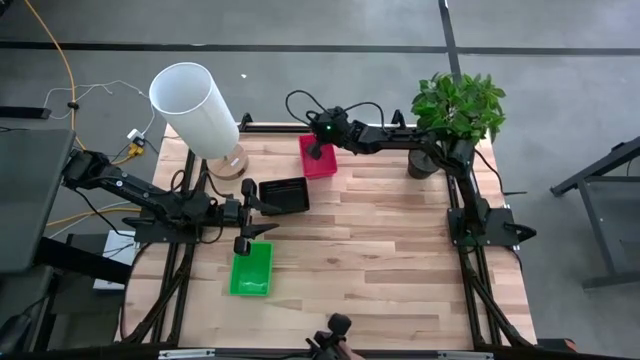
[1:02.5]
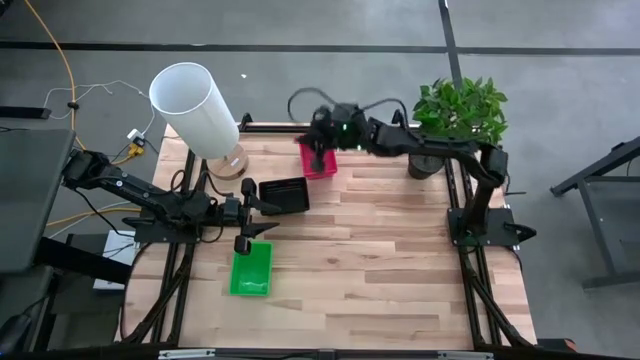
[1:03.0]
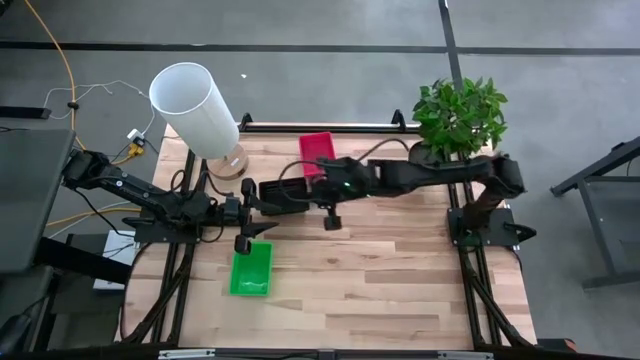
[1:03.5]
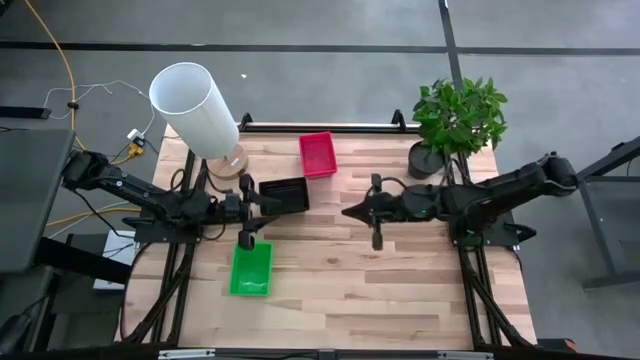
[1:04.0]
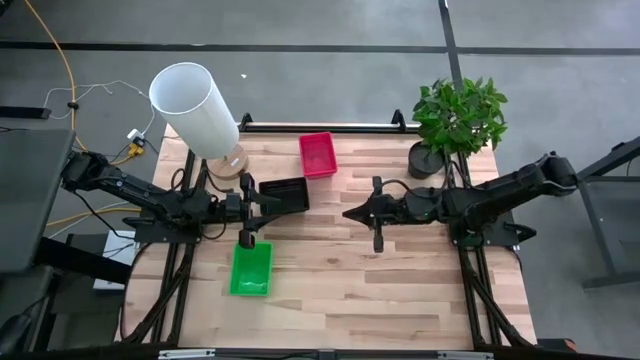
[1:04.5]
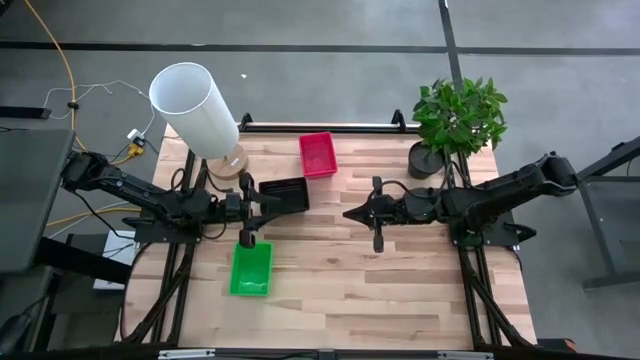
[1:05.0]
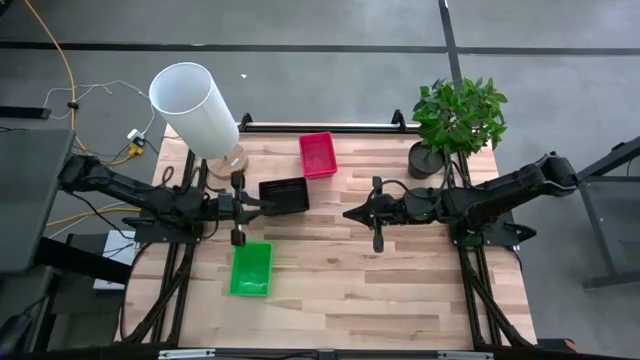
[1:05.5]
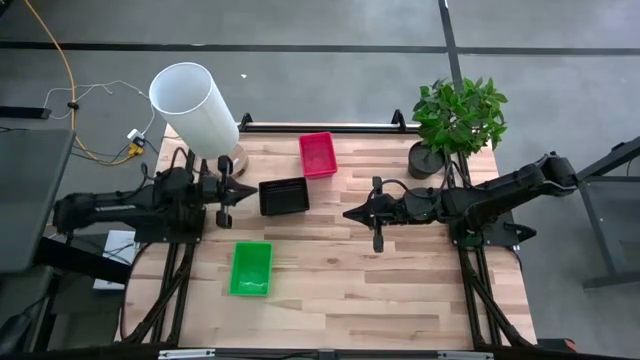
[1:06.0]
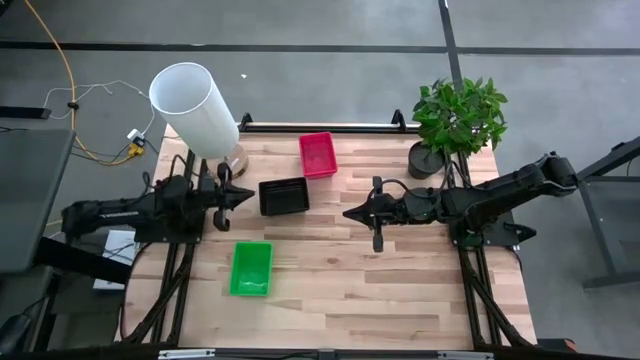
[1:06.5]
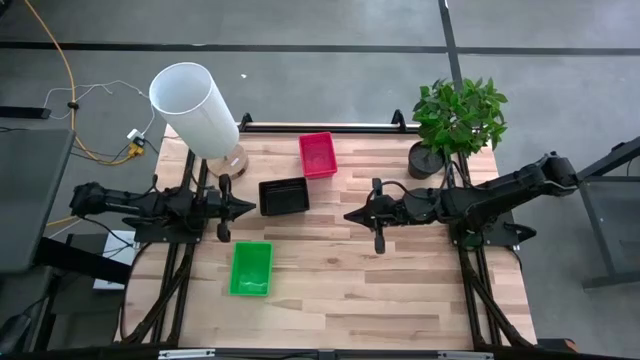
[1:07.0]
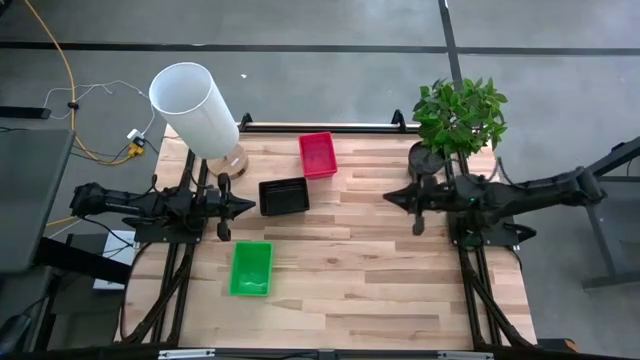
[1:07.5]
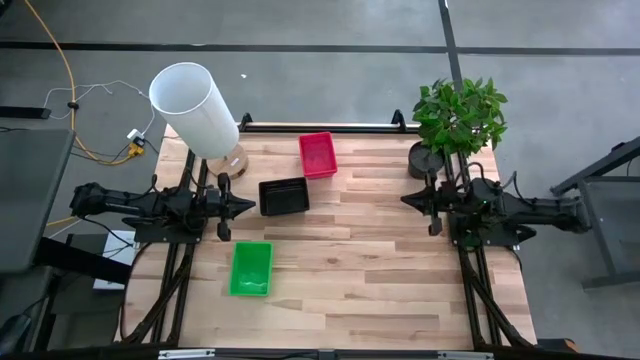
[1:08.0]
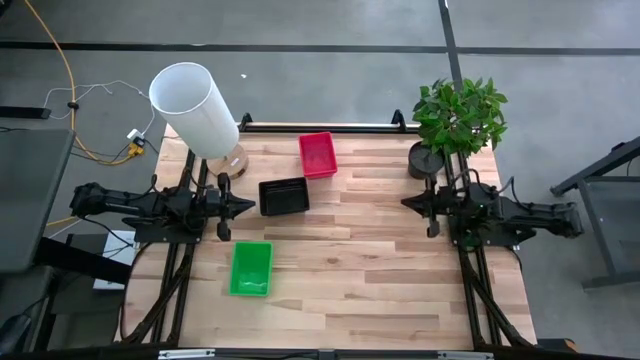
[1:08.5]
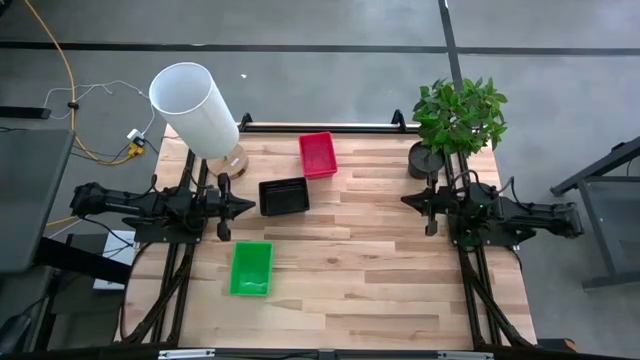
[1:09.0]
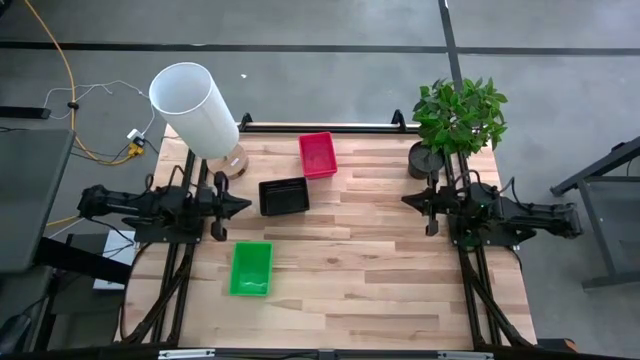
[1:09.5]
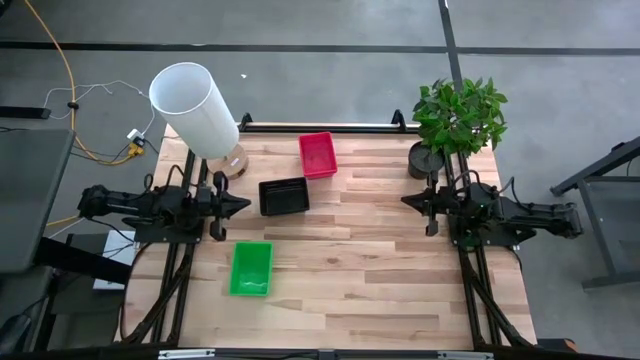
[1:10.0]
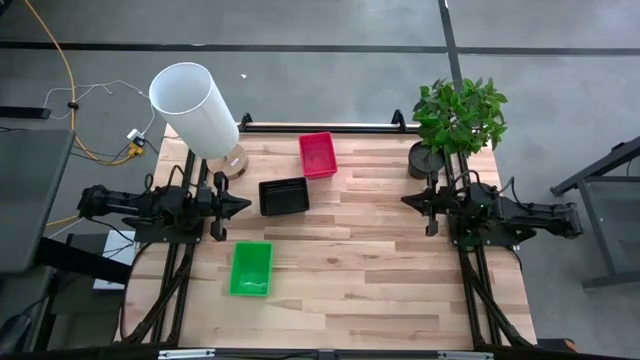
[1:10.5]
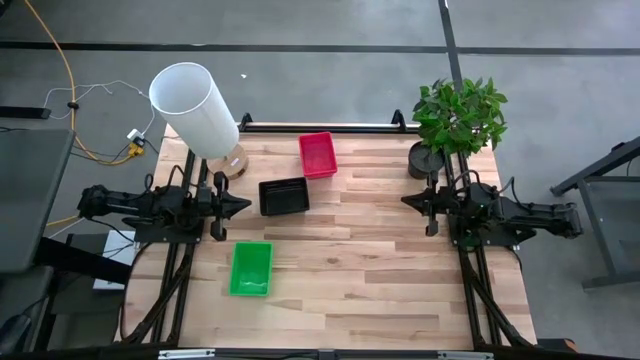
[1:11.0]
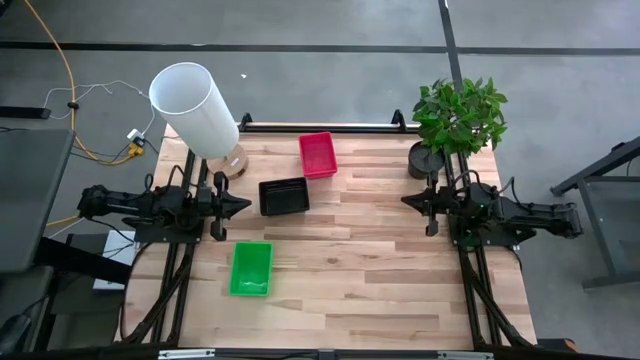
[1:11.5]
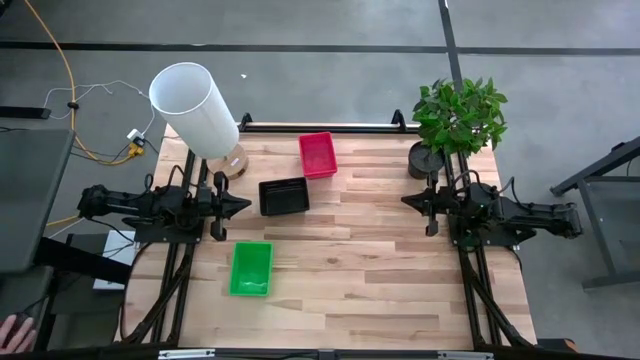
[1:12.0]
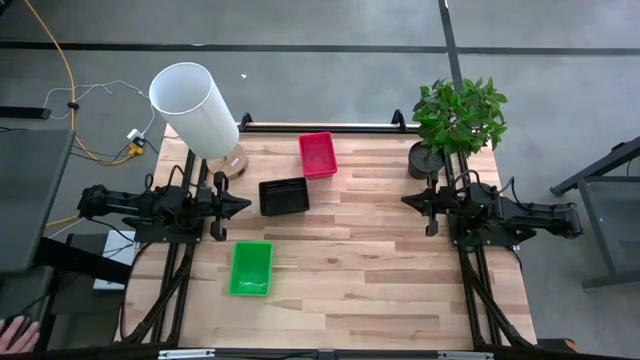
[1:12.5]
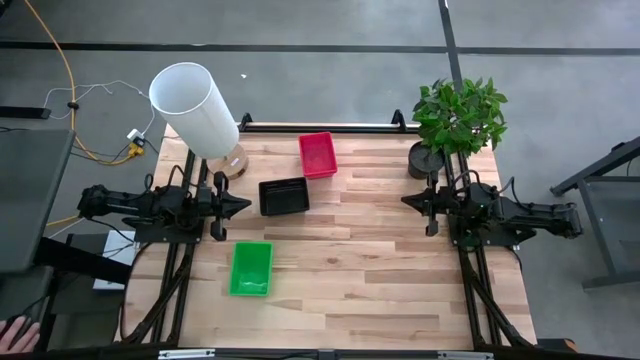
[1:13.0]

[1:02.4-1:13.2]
Return to Home Position

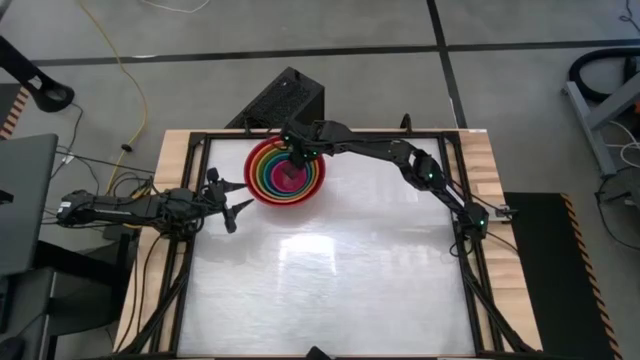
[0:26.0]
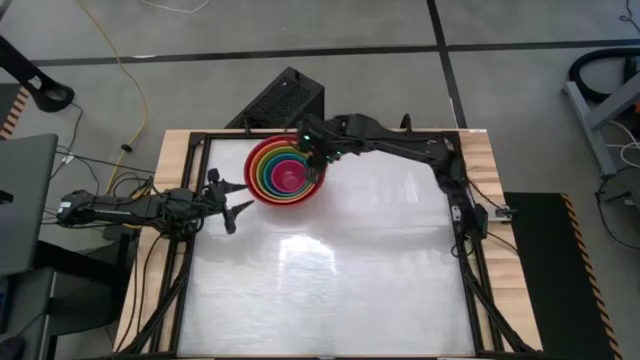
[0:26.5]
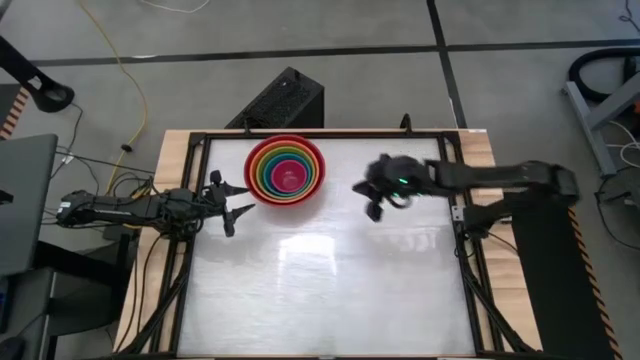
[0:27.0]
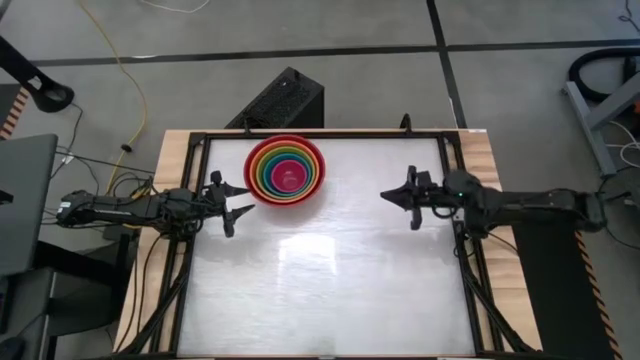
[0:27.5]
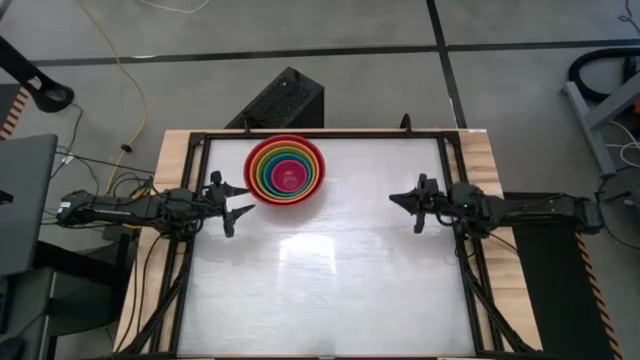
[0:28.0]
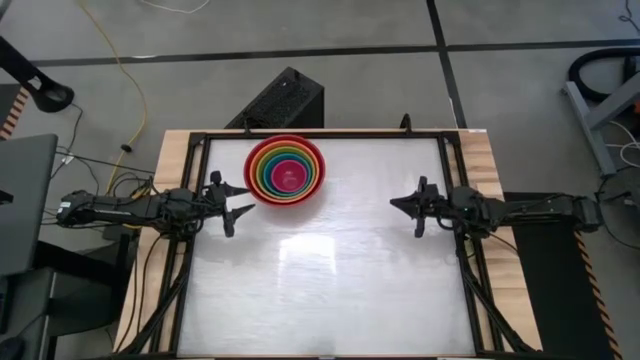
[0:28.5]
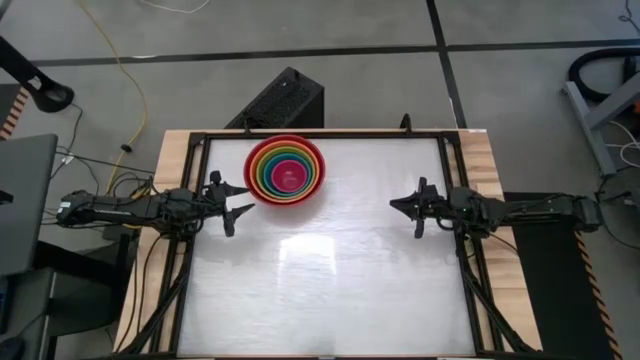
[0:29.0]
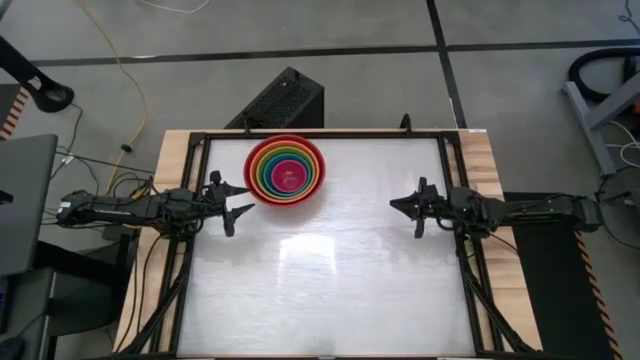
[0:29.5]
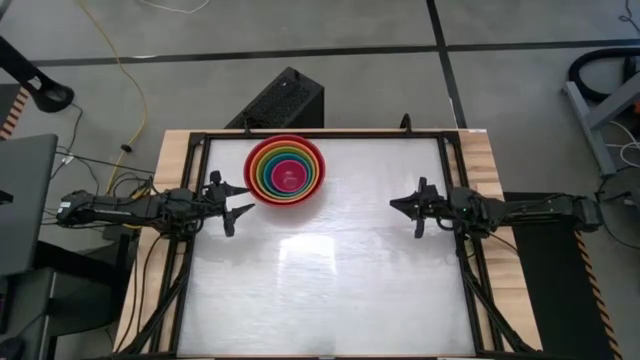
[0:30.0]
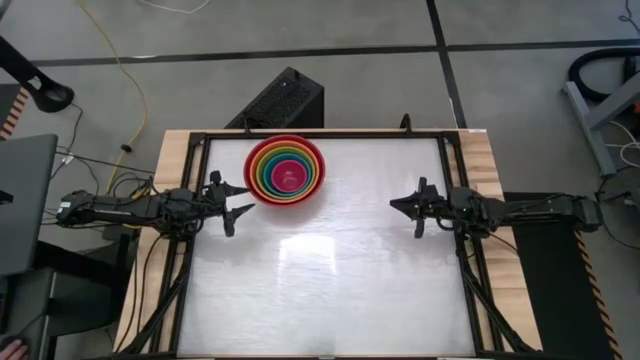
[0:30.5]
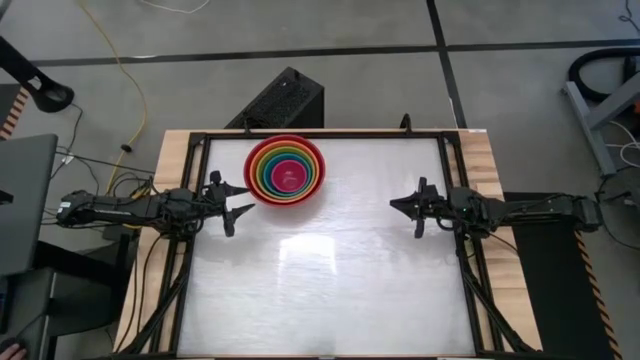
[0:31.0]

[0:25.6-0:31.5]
Return to Home Position

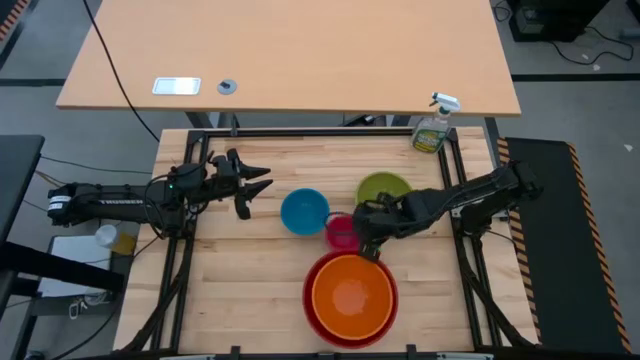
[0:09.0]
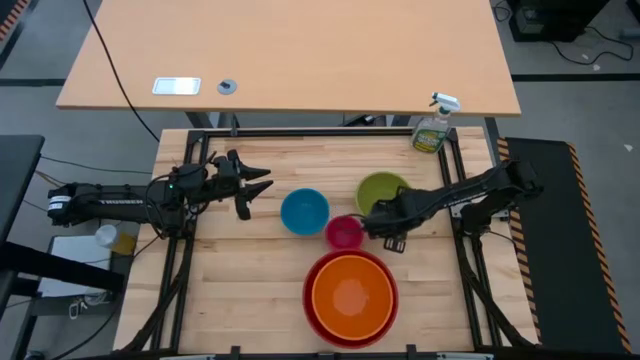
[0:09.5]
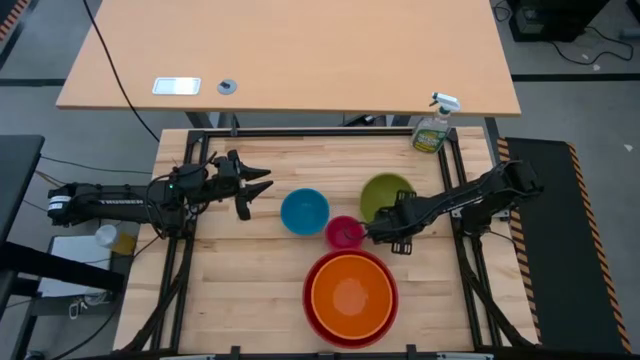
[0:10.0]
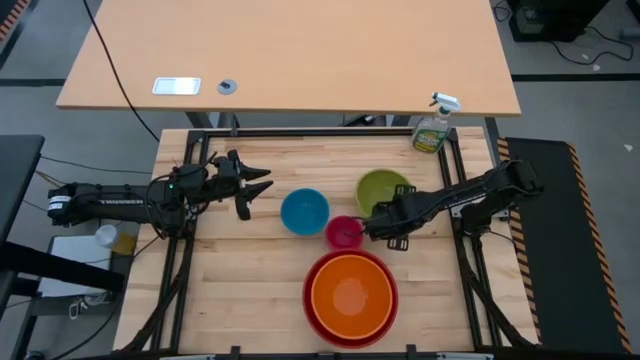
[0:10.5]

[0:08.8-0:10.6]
Stack the green bowl on top of the orange bowl

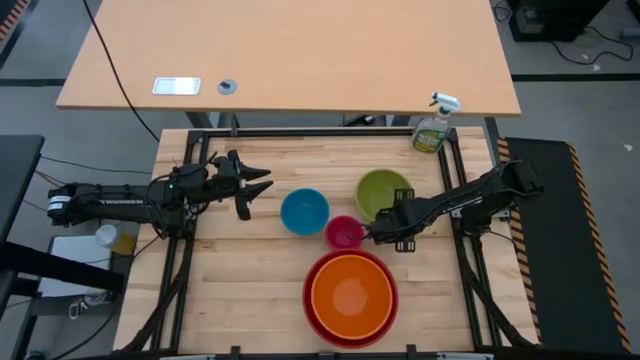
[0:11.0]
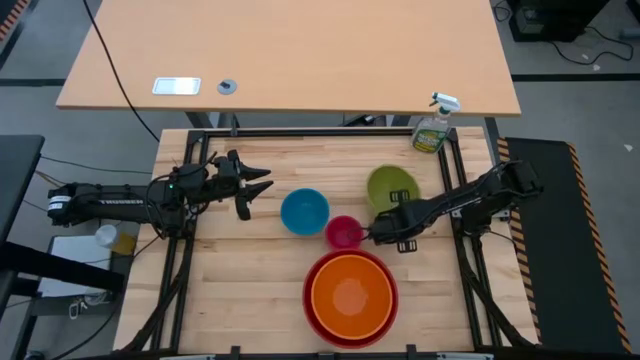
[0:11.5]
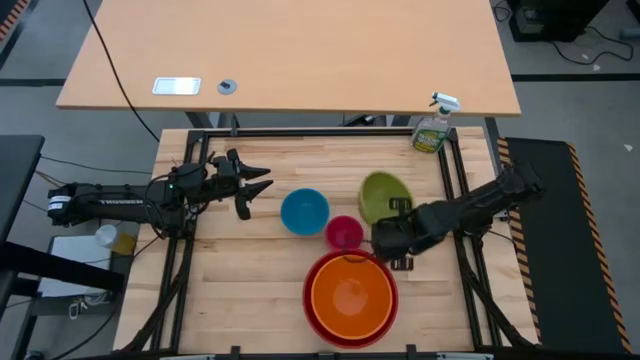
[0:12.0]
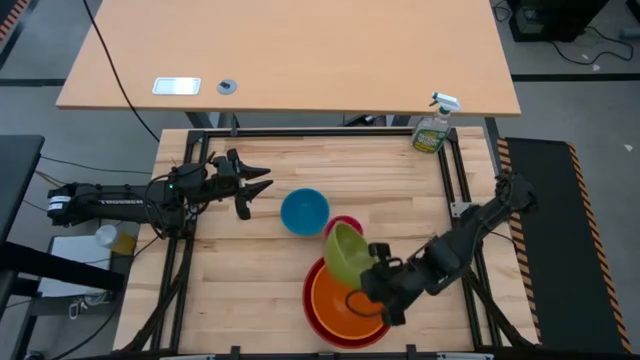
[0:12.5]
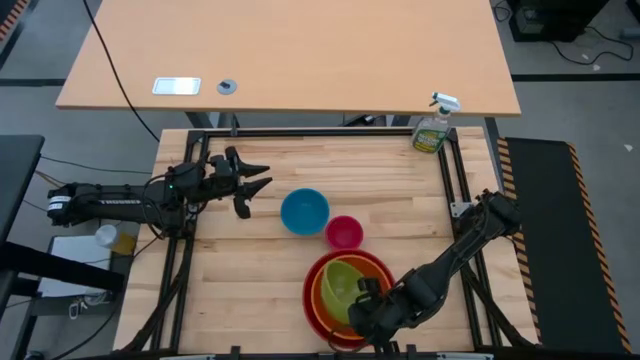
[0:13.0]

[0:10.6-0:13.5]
Stack the green bowl on top of the orange bowl
